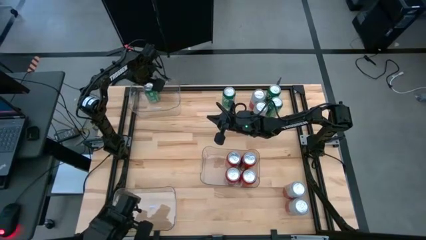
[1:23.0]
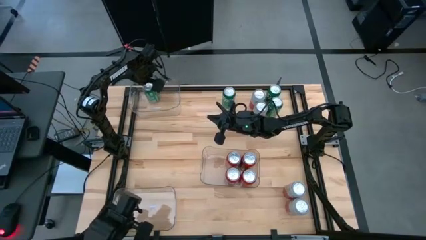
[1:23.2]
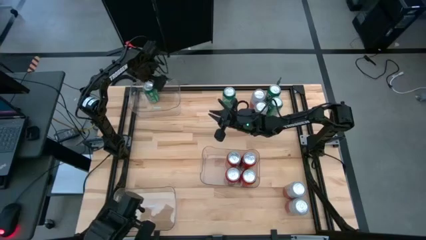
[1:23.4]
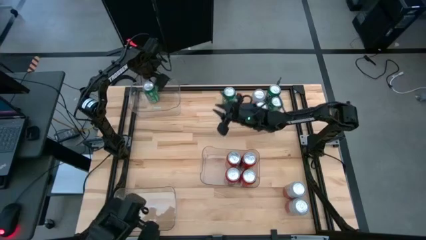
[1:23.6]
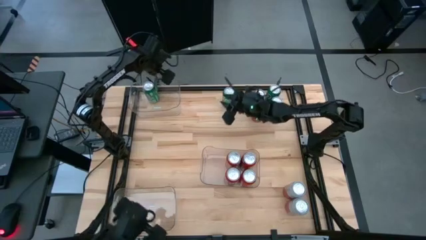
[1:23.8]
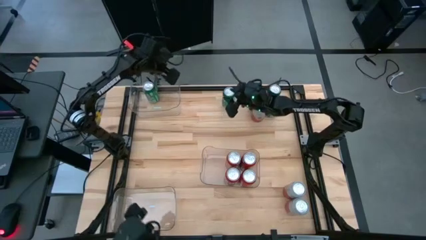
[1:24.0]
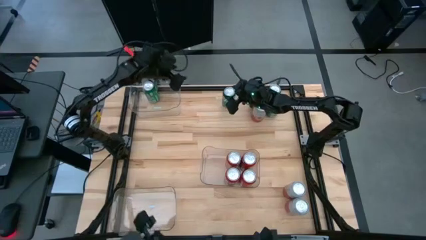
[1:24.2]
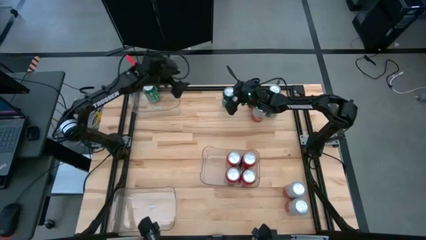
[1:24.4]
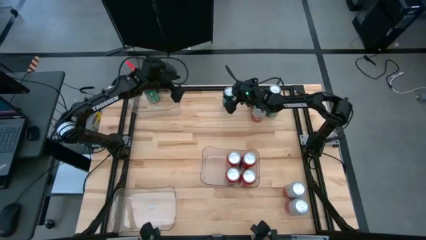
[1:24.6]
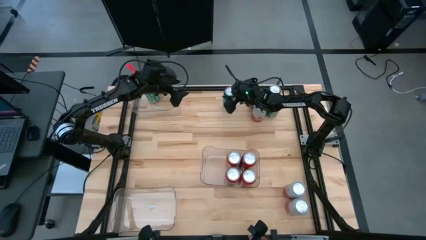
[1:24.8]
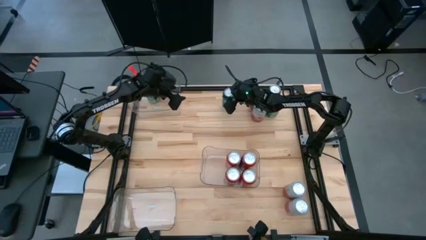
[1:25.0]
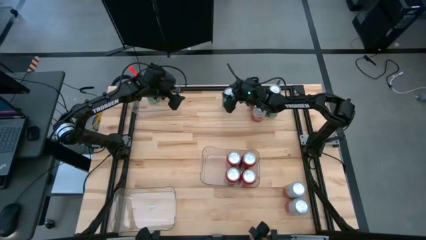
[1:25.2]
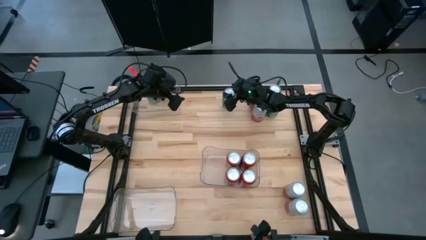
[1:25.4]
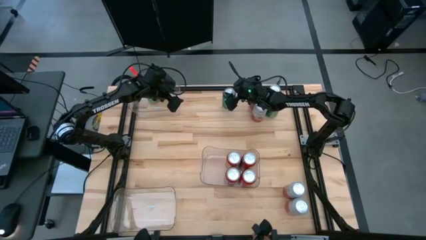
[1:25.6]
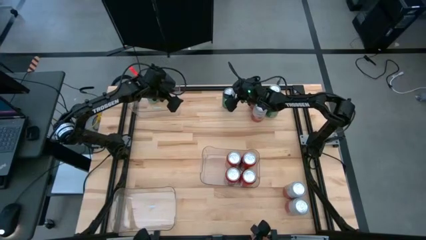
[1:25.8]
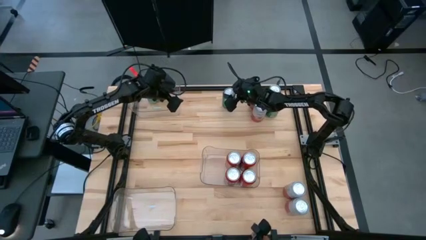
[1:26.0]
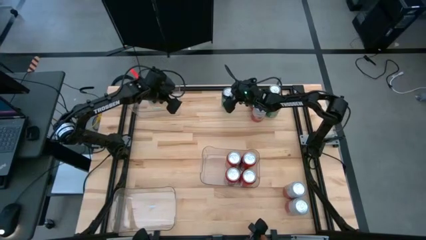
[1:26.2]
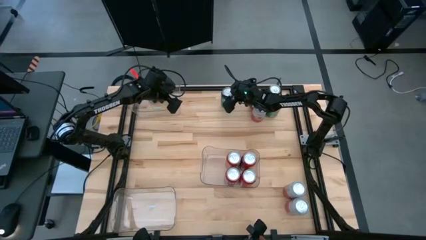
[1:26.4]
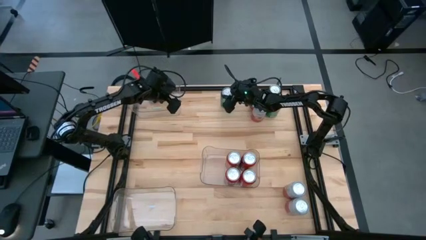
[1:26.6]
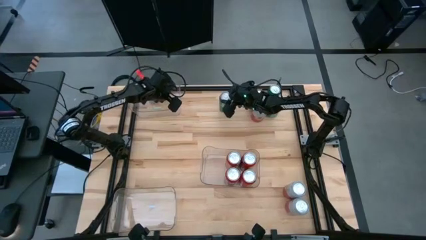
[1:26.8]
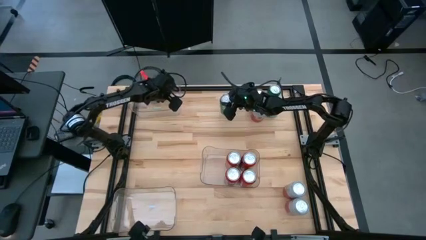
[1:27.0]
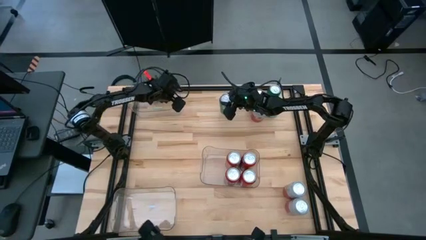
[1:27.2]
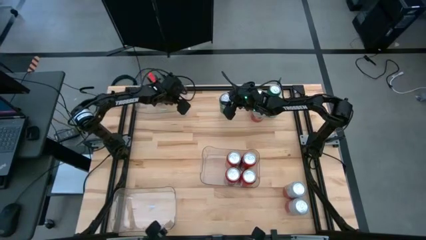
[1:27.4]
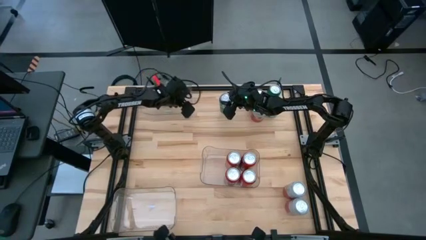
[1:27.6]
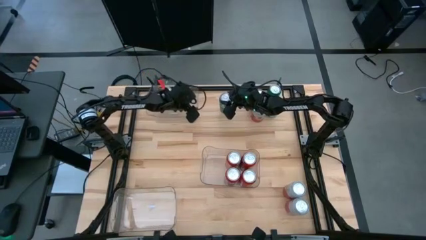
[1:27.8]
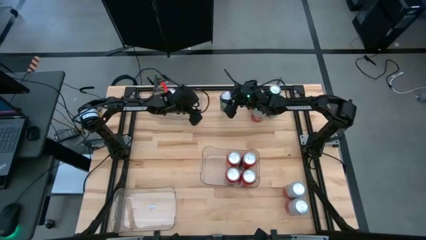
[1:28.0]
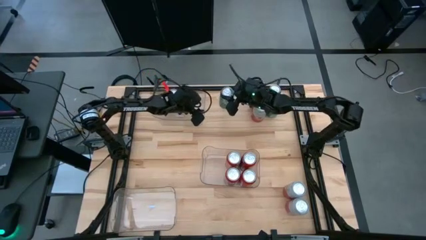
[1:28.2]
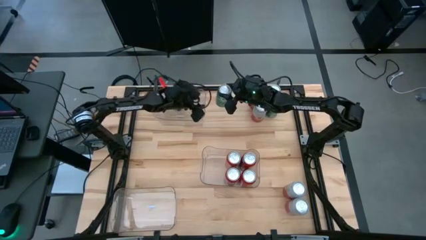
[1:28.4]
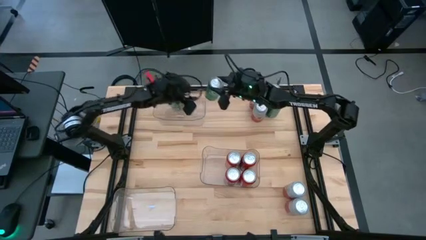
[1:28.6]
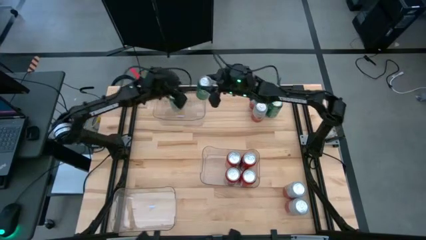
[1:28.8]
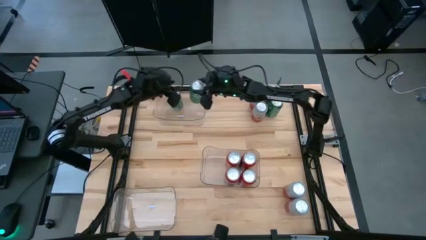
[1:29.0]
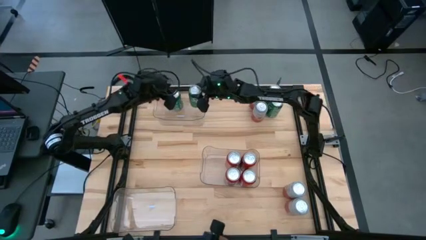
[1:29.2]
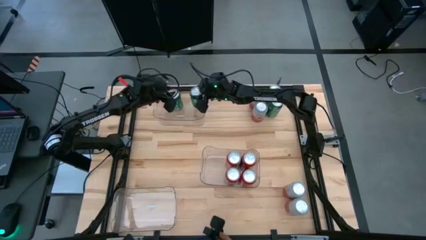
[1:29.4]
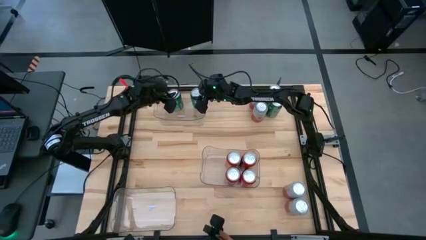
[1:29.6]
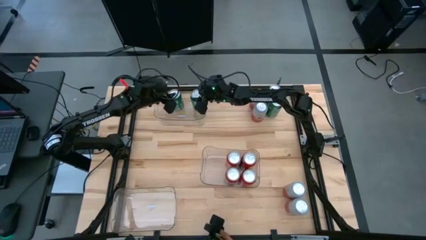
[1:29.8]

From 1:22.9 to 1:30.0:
Task: Sort soda cans
Put the sprite soda can into the top left transparent bin

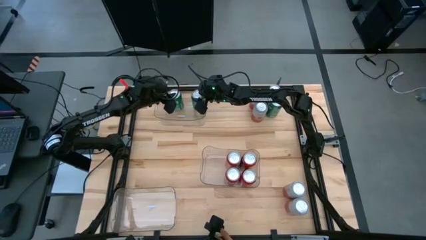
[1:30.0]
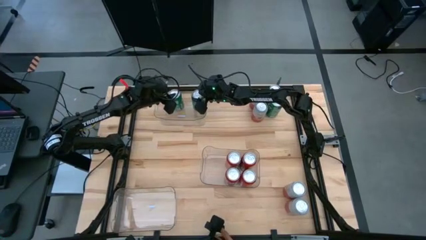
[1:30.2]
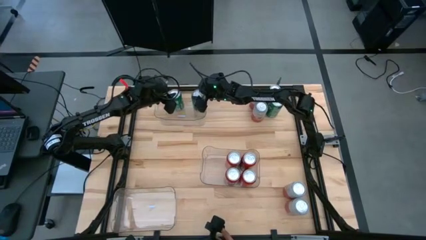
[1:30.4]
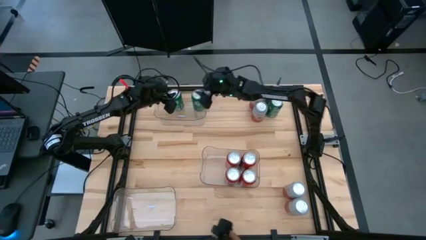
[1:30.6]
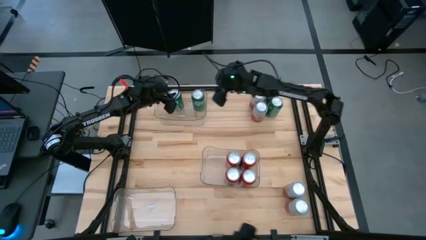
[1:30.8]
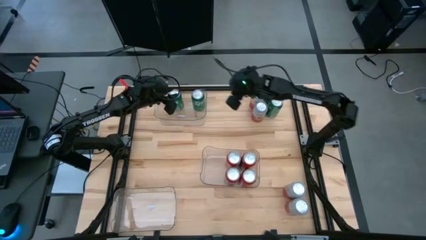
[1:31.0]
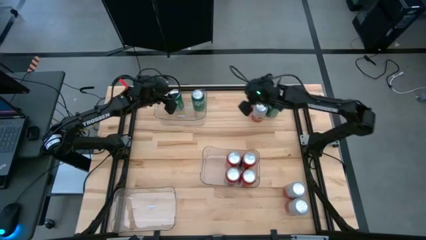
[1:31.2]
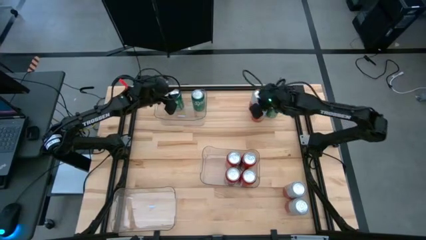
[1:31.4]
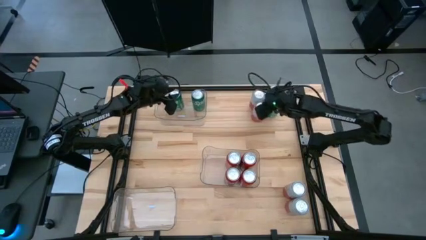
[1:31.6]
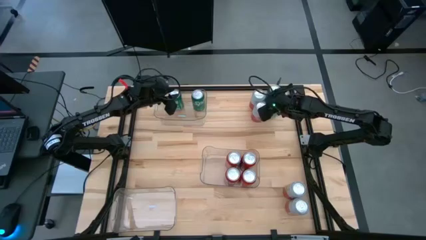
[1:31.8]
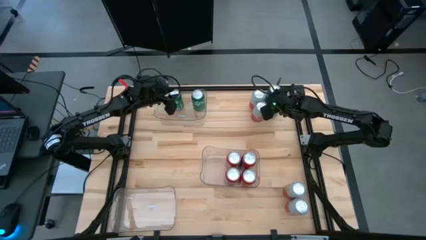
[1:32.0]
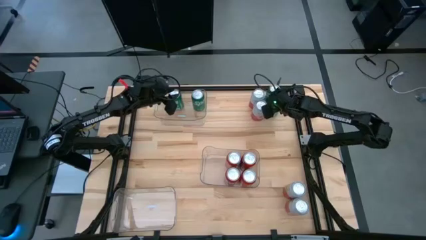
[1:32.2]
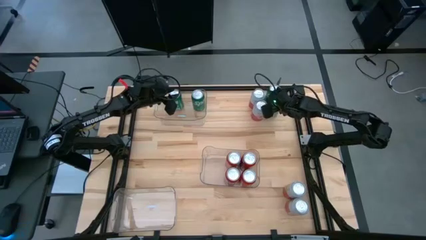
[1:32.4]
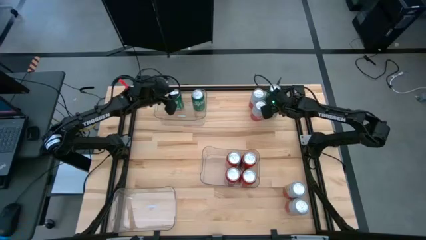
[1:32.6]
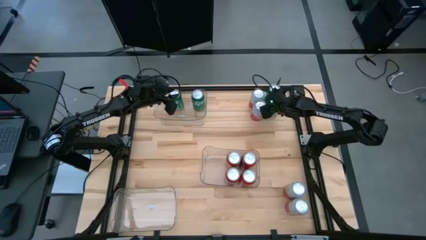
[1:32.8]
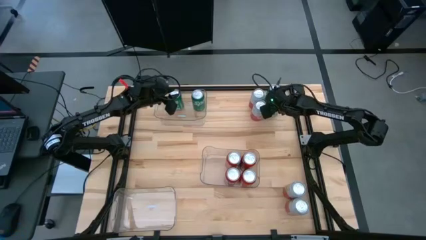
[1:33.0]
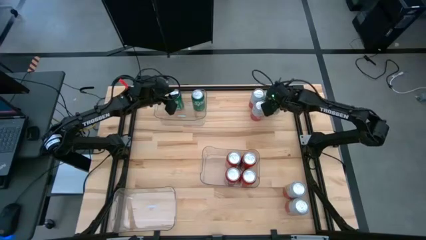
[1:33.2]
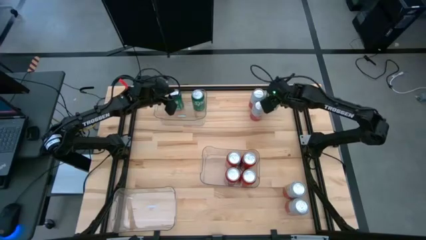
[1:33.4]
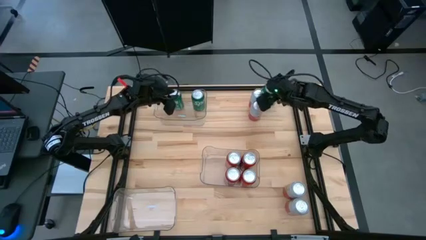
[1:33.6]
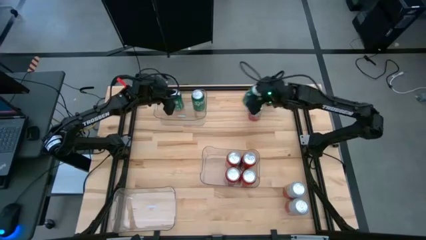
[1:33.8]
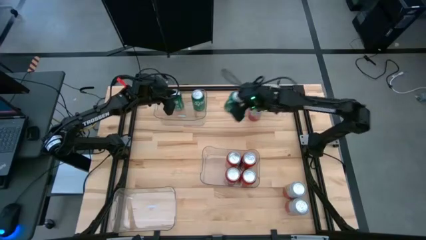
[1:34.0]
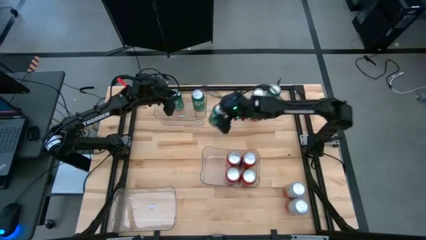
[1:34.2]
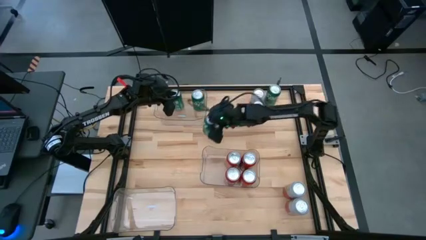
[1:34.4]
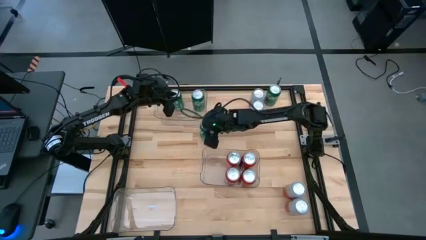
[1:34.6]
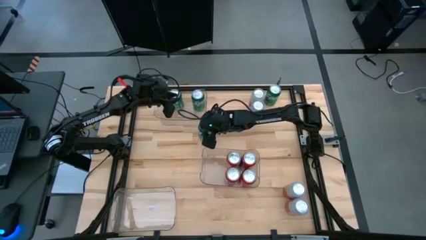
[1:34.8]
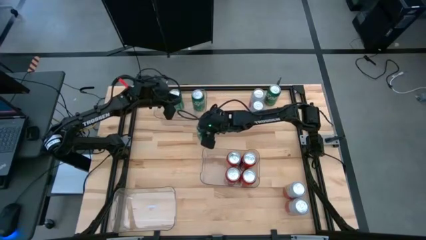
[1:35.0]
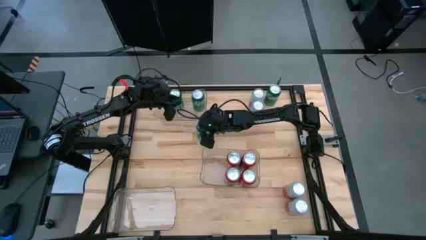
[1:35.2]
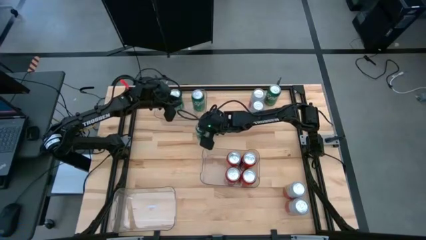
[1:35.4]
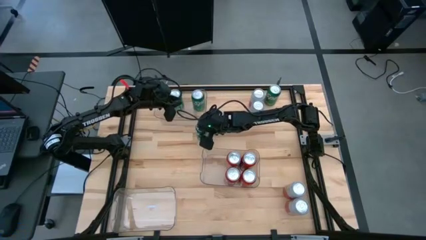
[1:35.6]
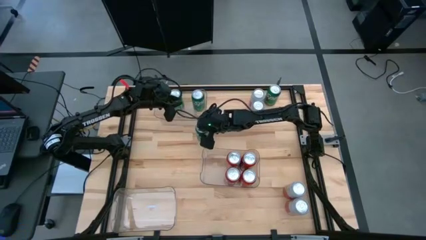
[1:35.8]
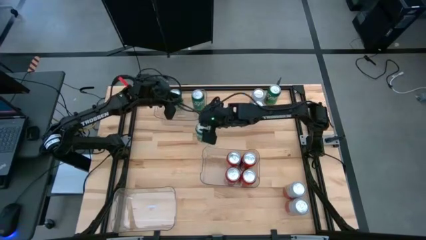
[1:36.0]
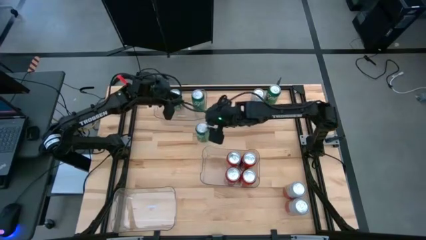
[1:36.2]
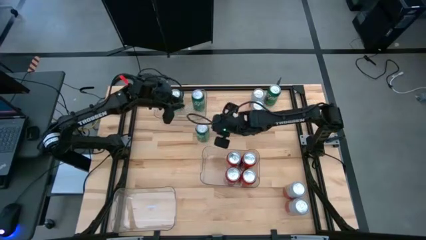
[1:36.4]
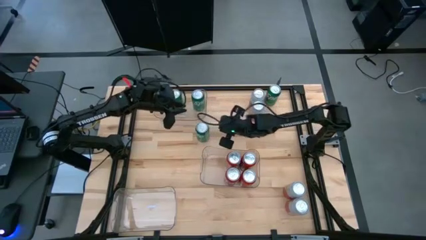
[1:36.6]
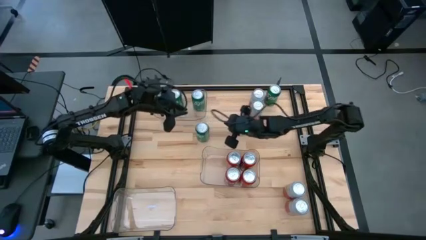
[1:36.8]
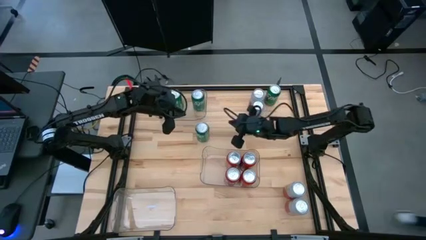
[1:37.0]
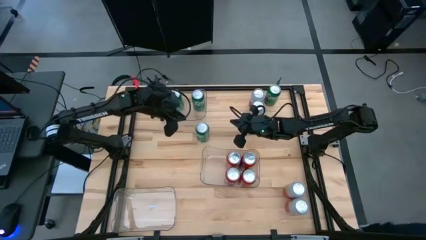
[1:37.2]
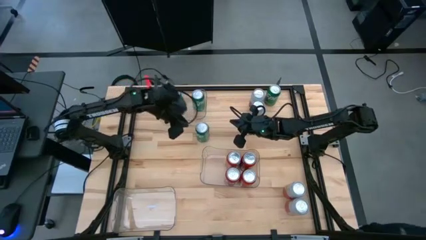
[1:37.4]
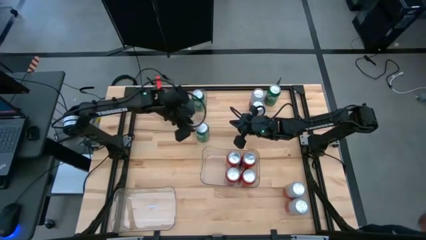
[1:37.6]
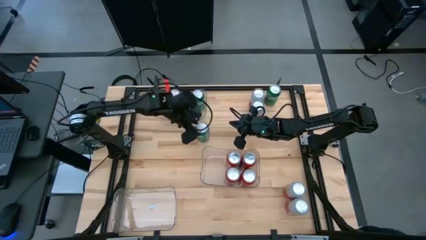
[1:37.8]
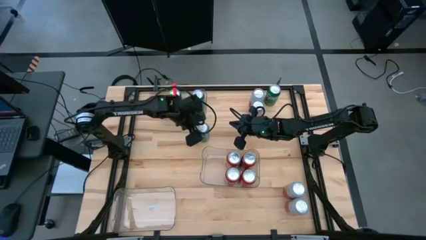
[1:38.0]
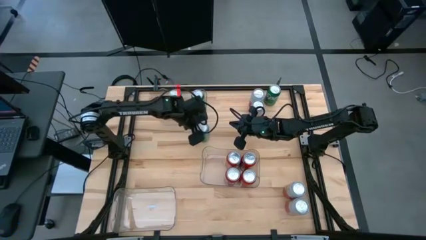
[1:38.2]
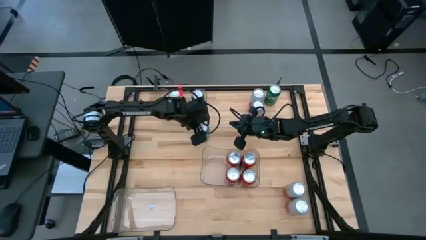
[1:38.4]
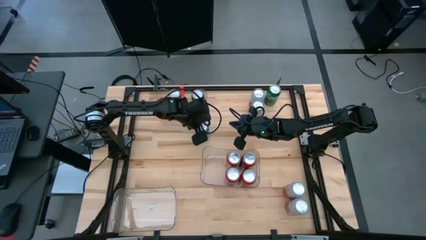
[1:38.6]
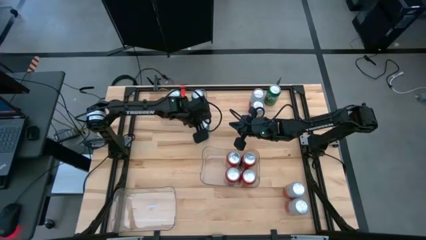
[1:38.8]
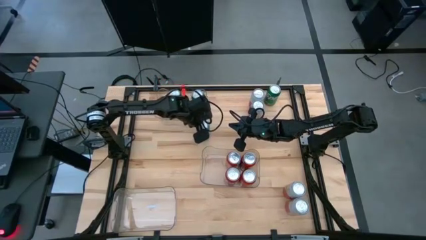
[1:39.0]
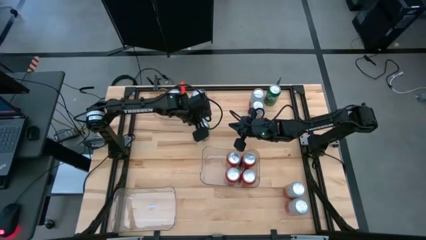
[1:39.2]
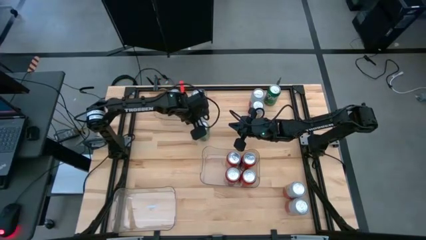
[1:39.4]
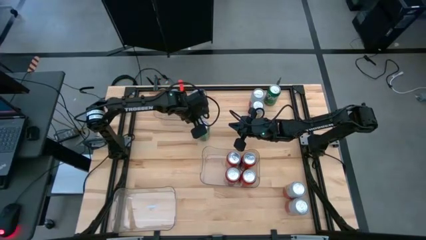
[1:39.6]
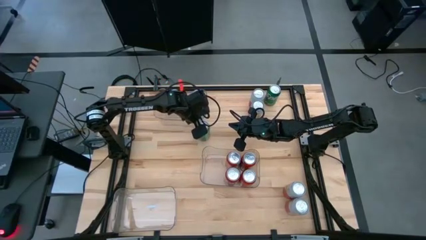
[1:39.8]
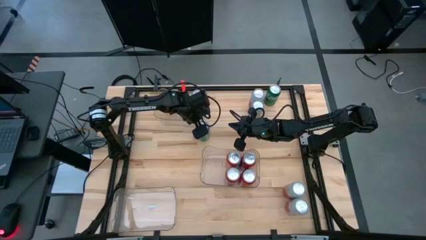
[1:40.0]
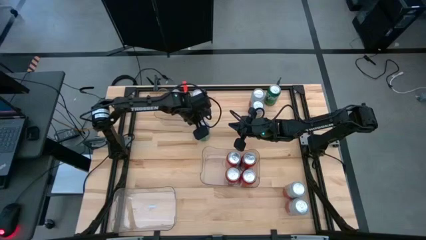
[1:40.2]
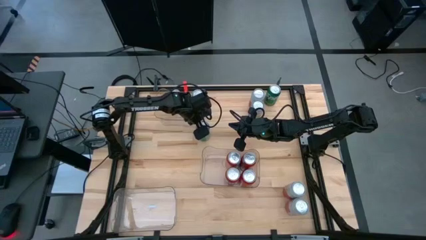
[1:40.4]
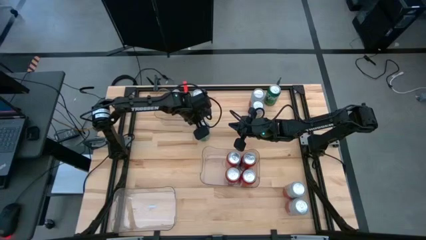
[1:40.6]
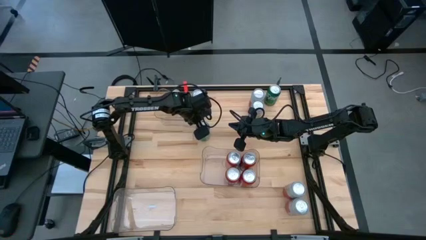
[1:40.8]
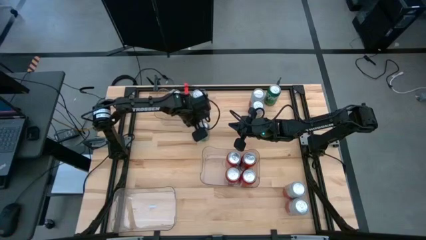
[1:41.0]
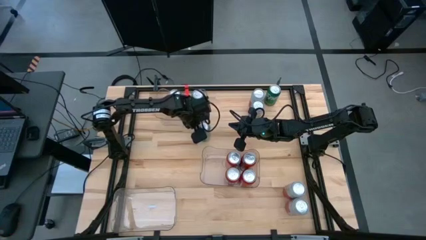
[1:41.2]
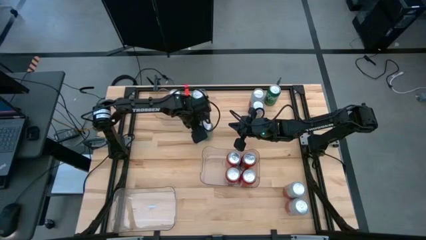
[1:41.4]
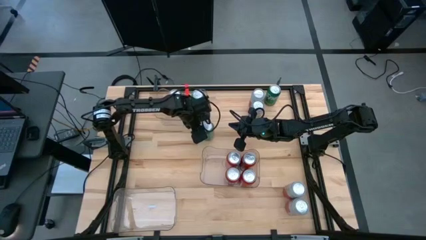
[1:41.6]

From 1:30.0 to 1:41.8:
Put the sprite soda can into the top left transparent bin
